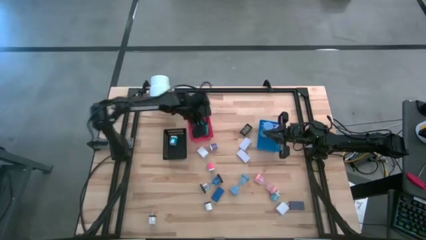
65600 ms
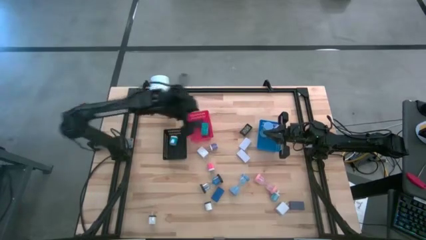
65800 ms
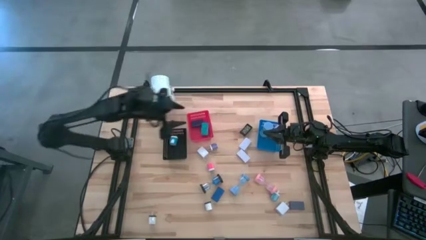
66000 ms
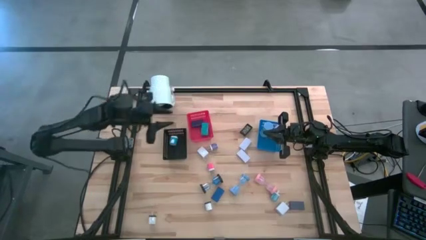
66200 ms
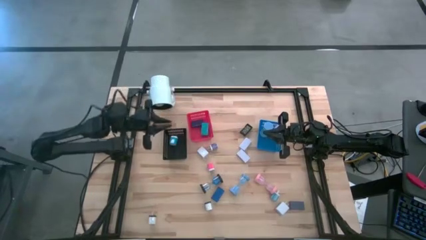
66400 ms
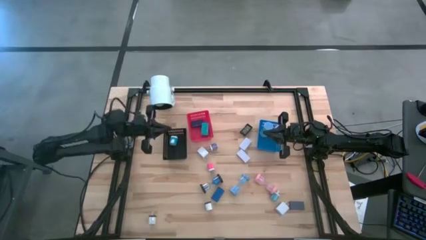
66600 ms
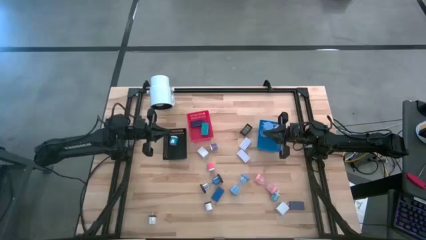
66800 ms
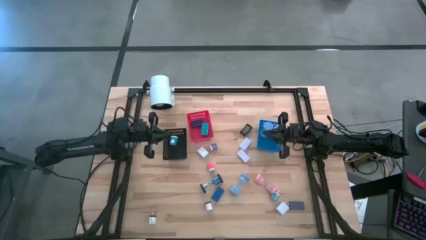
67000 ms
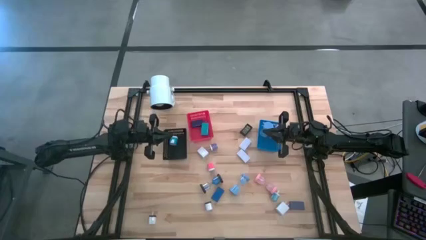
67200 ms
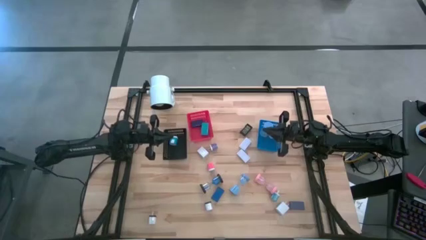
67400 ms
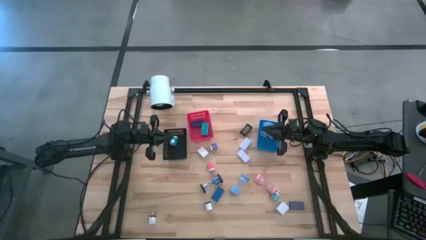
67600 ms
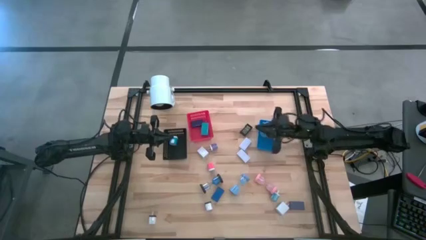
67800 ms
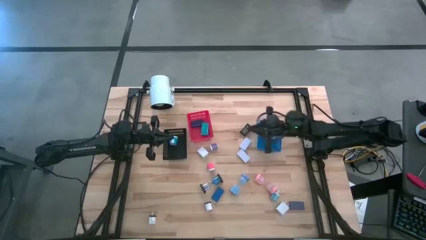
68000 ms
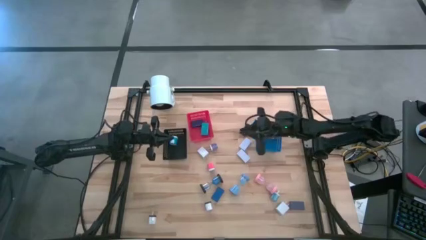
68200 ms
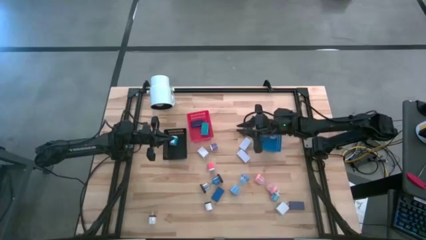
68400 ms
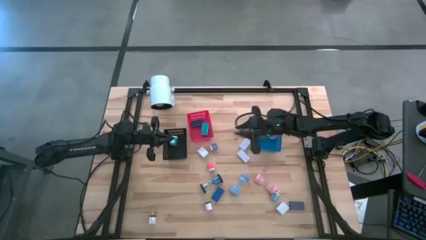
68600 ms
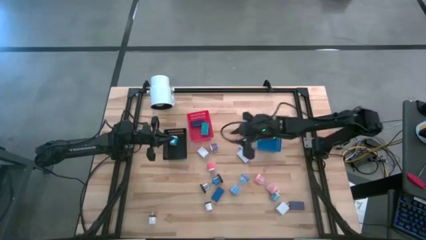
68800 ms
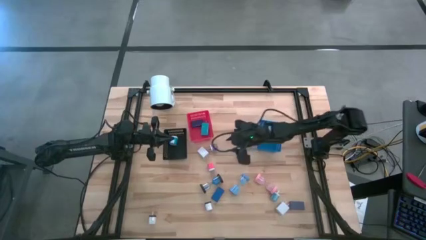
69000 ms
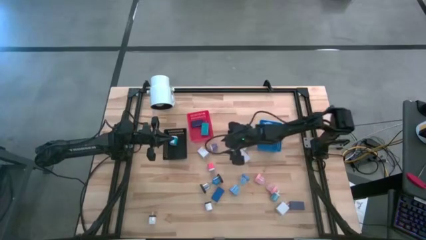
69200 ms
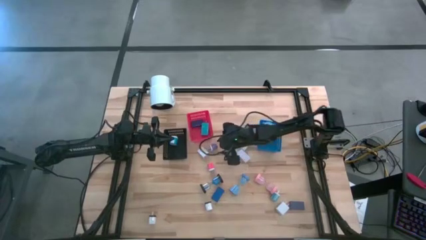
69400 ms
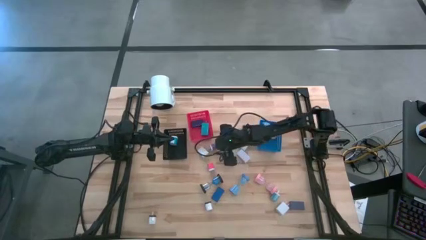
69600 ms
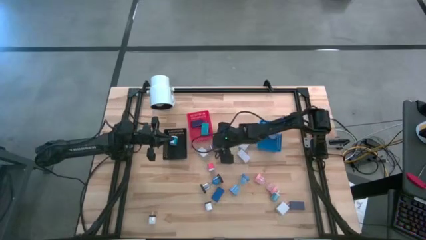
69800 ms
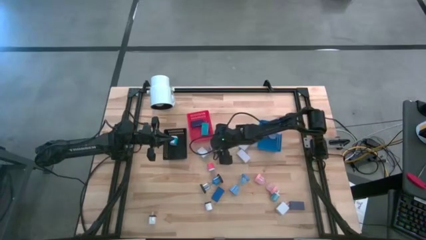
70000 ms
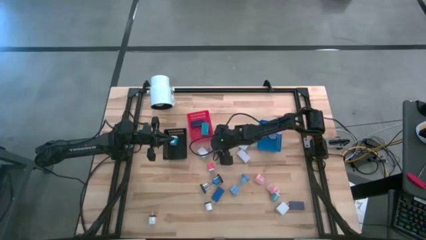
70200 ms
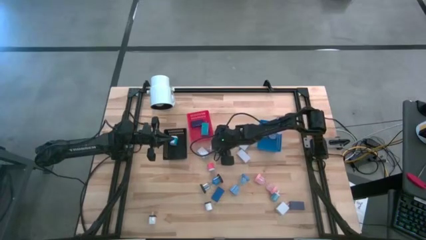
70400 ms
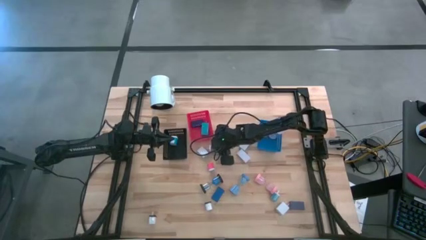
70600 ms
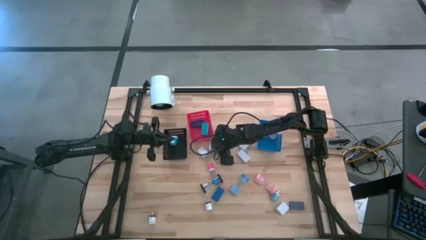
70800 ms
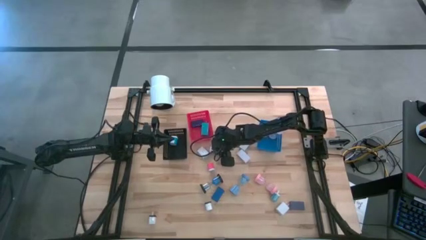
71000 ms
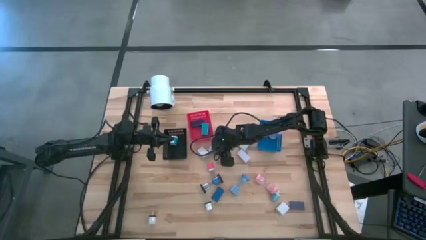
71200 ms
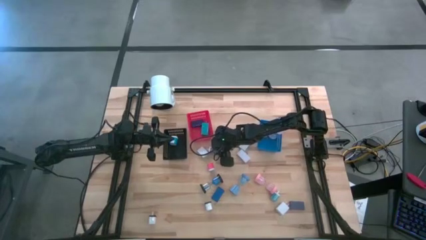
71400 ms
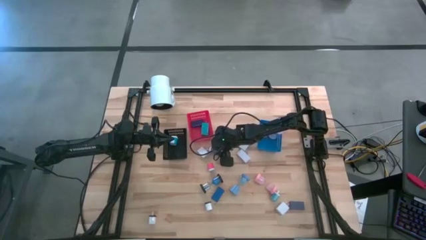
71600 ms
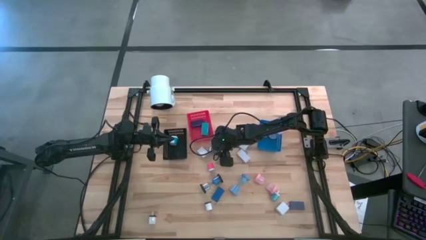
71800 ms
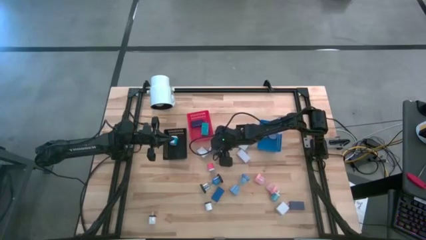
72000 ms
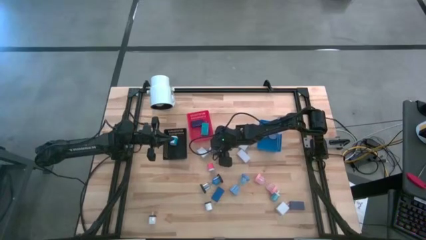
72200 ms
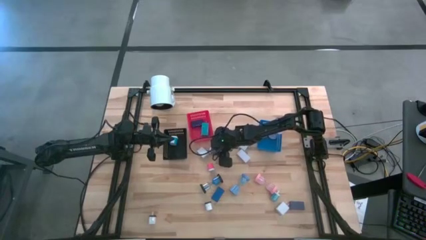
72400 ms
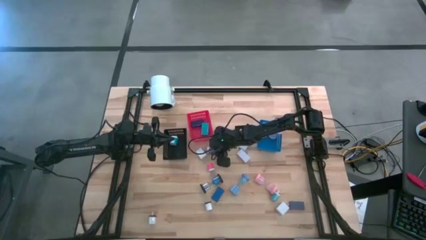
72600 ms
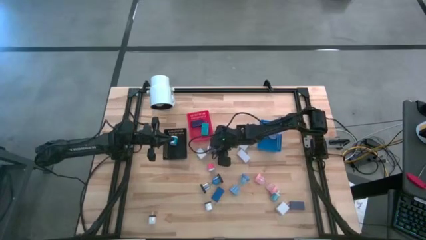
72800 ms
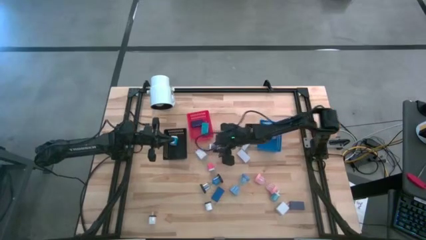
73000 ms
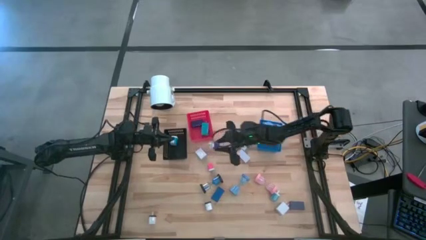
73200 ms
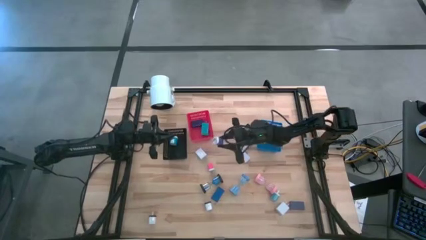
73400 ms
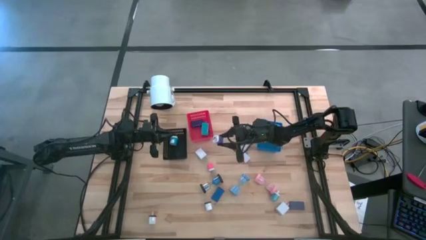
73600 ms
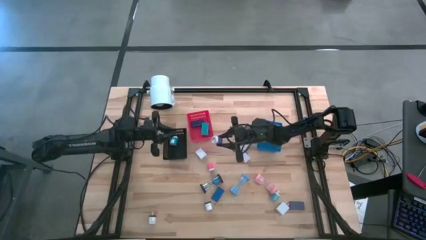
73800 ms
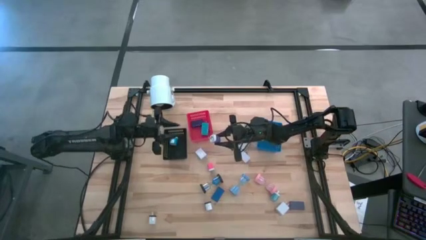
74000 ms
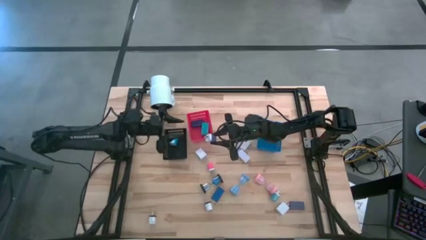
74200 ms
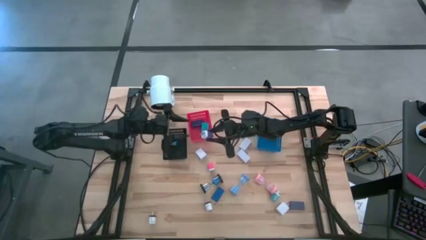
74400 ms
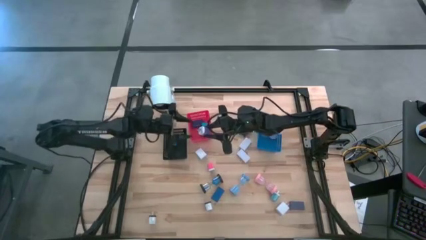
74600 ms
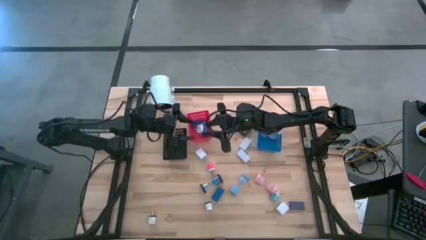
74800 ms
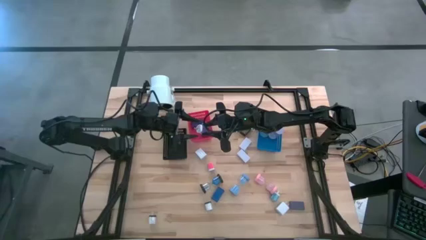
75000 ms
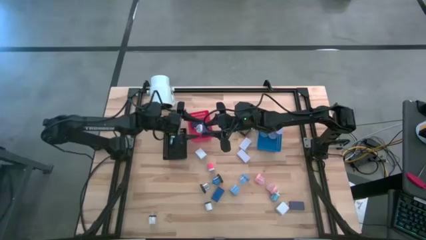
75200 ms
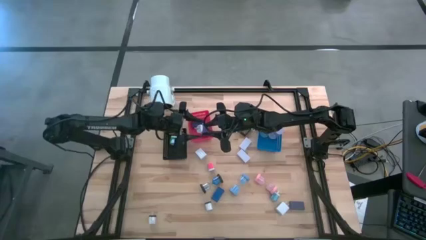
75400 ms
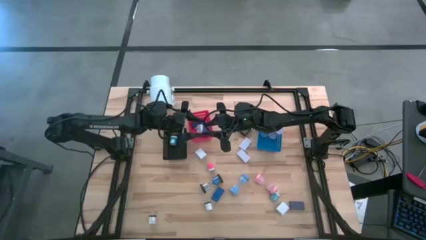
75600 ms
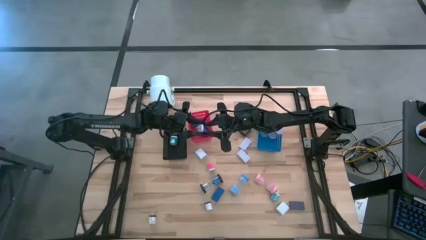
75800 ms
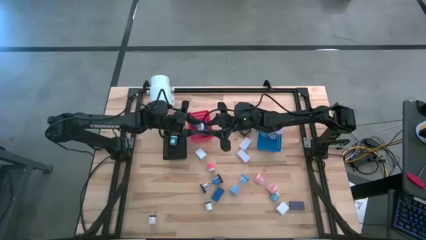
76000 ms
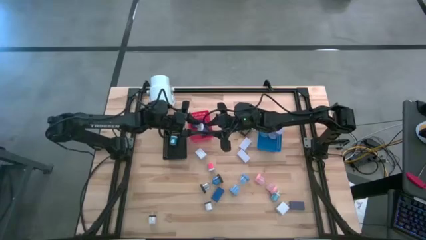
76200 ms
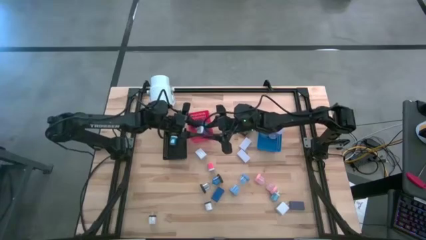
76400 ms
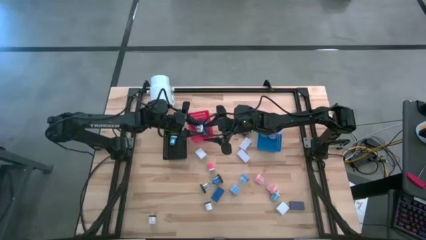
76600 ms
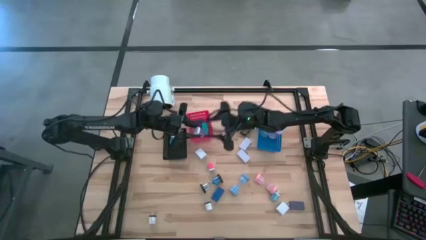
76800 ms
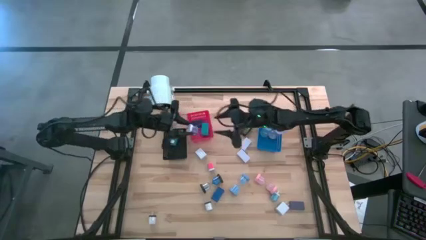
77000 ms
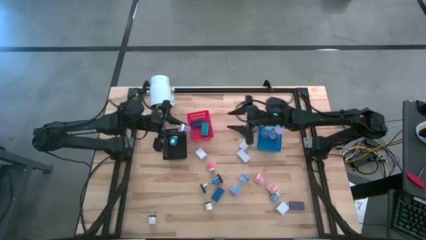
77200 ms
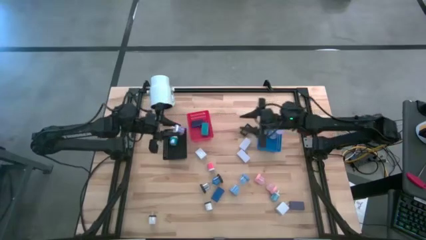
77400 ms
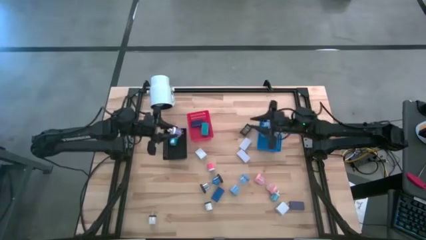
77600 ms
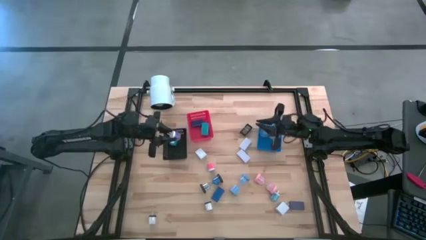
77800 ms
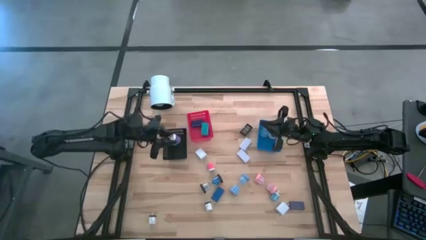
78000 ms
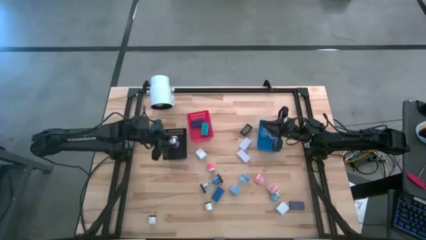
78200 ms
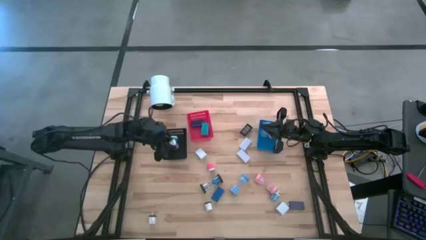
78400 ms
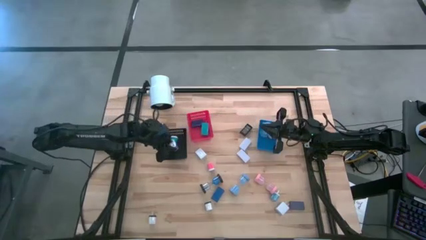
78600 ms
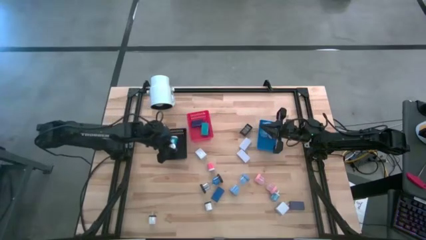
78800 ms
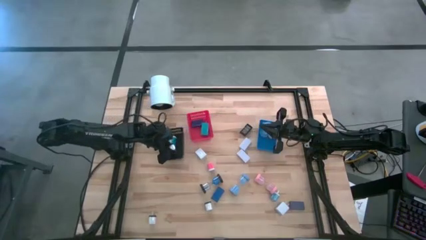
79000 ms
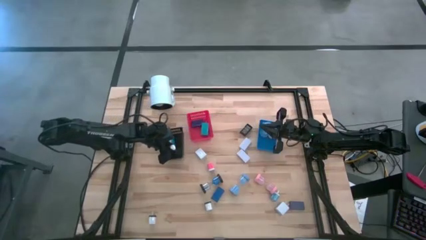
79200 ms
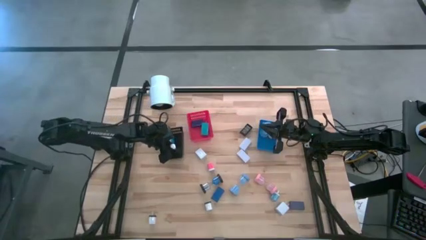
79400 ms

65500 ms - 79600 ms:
Task: Pick & Place Office items
Put the violet charger adapter into the black bin

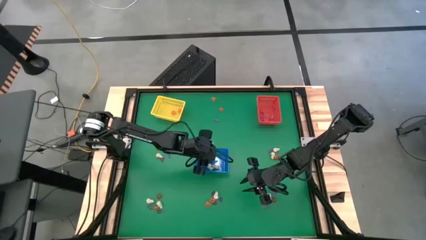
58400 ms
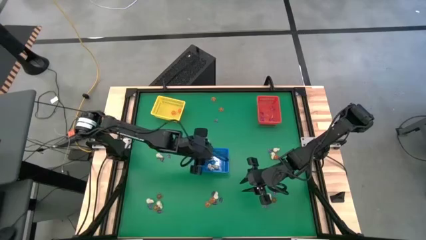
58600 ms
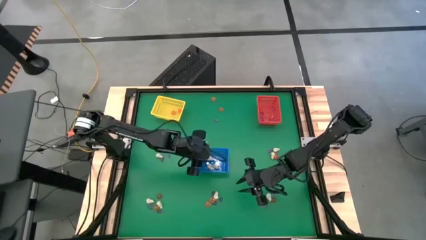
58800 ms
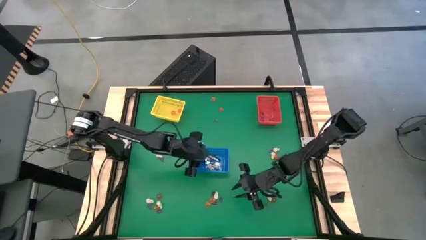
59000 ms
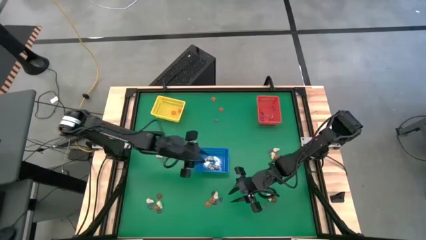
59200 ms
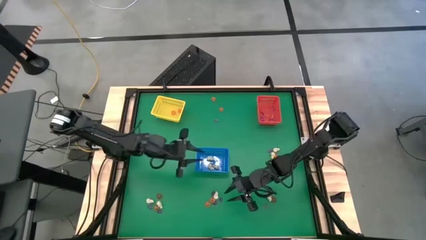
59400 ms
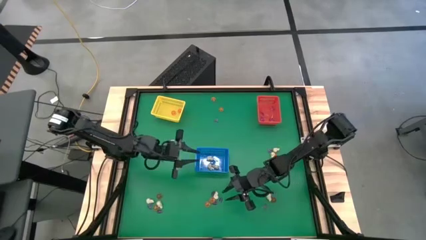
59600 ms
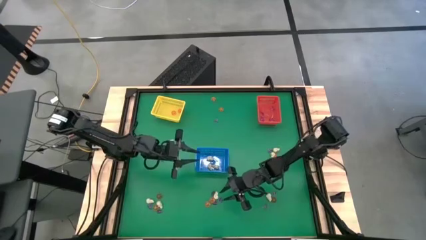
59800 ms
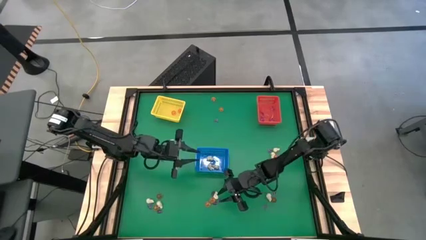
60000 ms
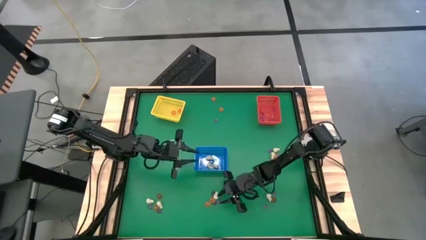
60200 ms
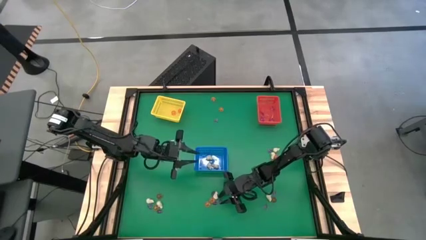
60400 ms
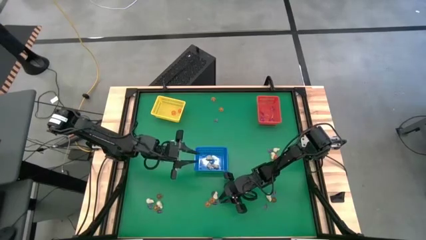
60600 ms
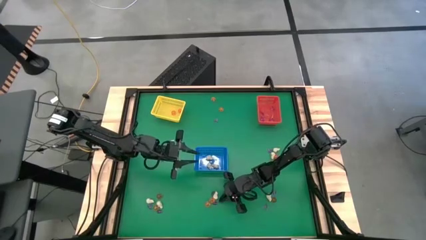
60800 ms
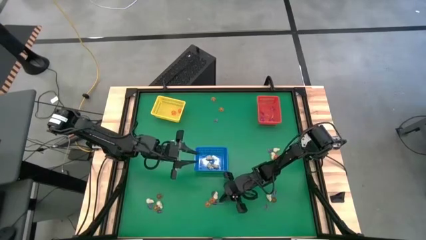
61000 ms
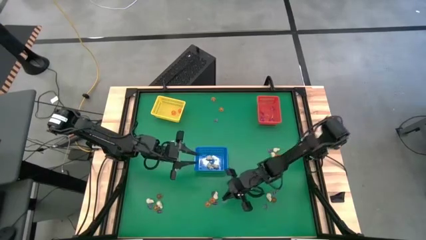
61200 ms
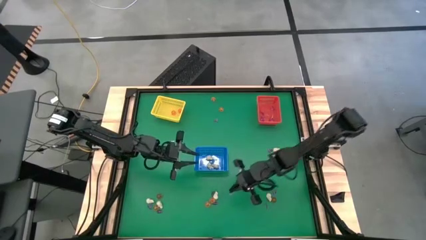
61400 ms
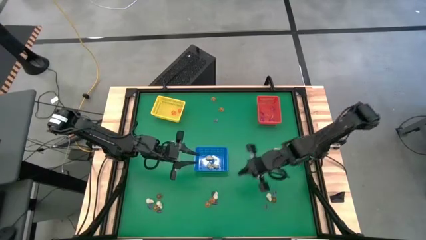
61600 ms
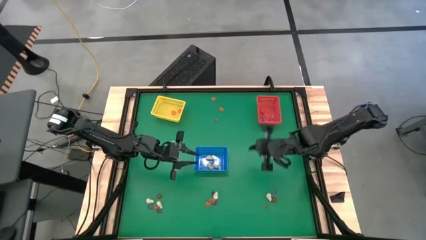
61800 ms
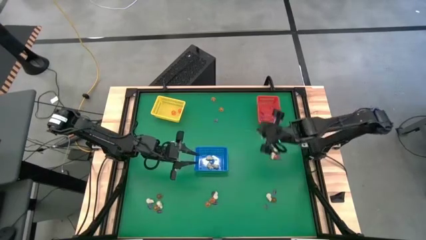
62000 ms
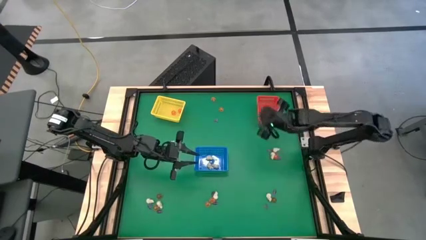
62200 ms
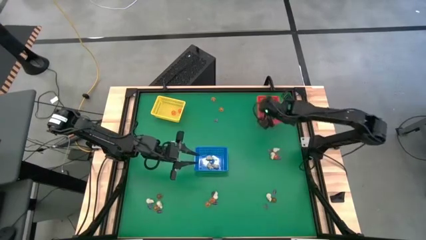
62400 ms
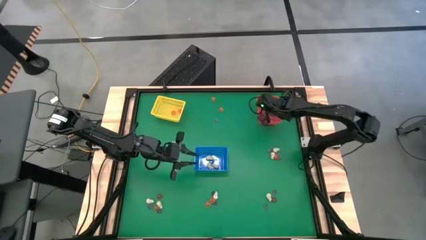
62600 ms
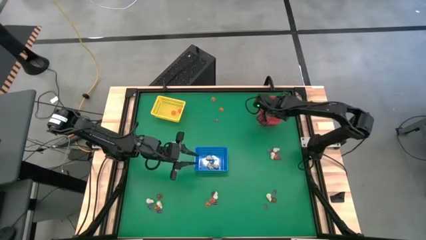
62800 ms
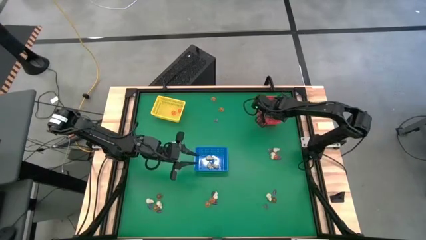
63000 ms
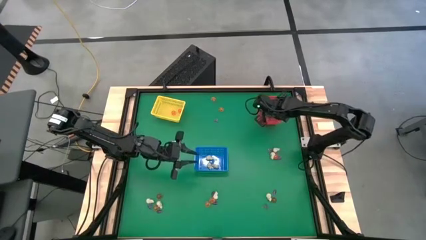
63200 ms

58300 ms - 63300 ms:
Task: Sort Halloween decoration
Put the purple witch hat toy into the red bin
